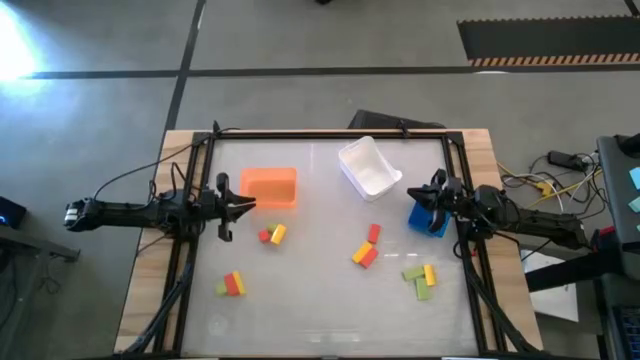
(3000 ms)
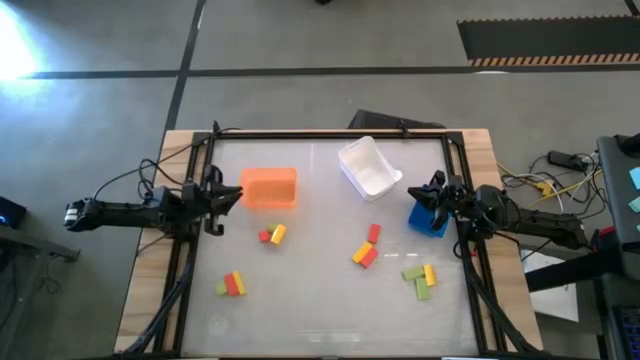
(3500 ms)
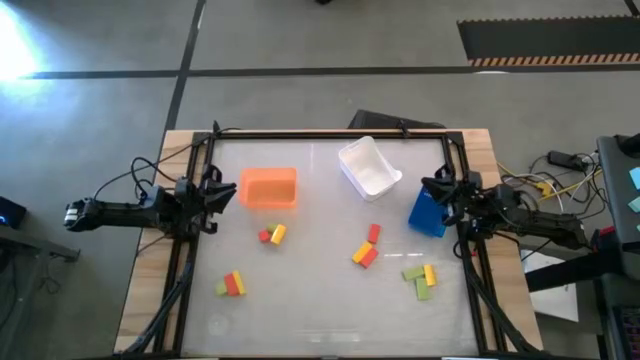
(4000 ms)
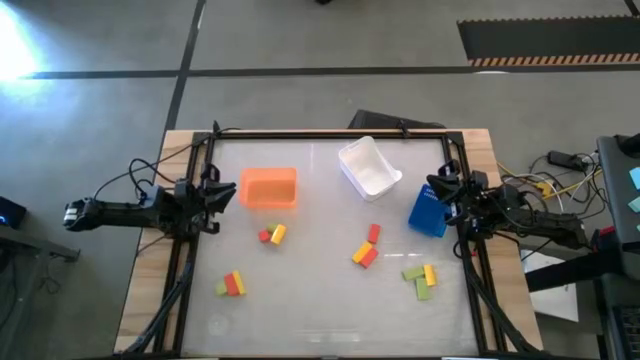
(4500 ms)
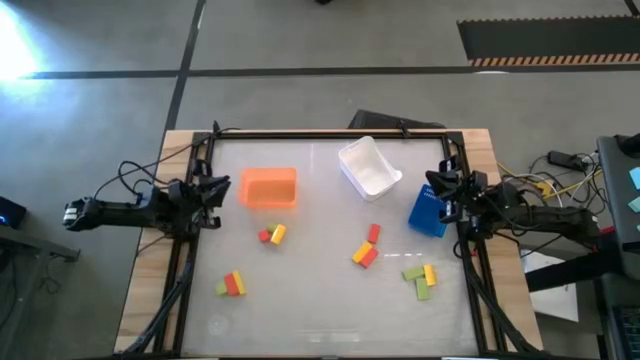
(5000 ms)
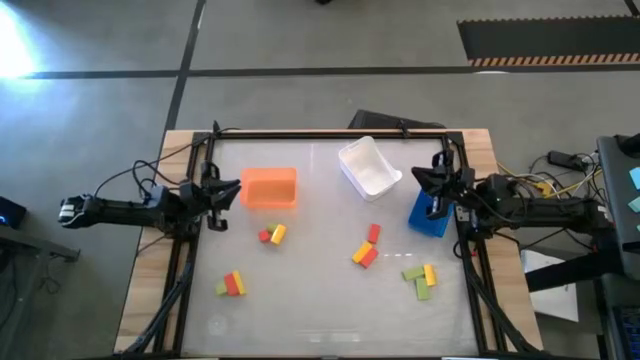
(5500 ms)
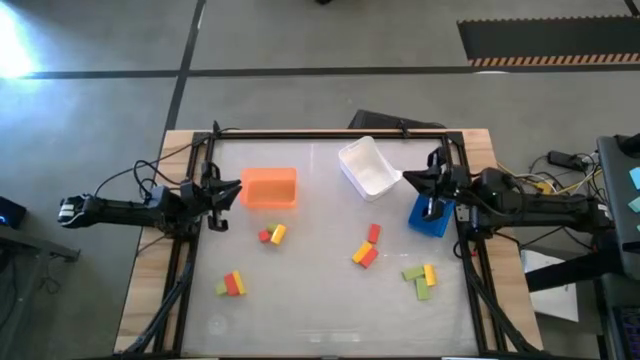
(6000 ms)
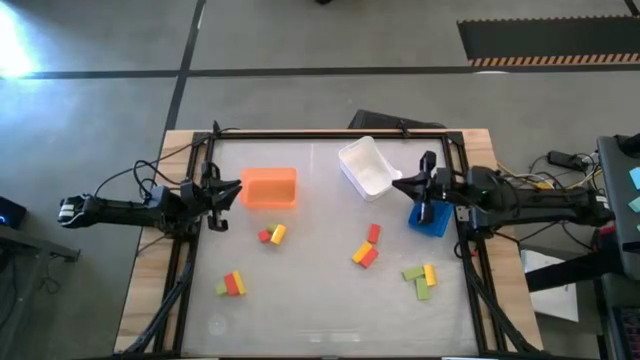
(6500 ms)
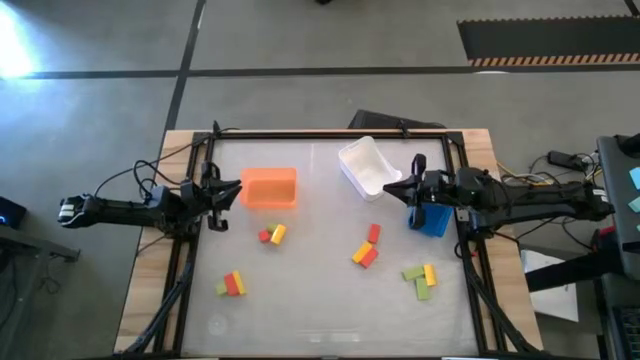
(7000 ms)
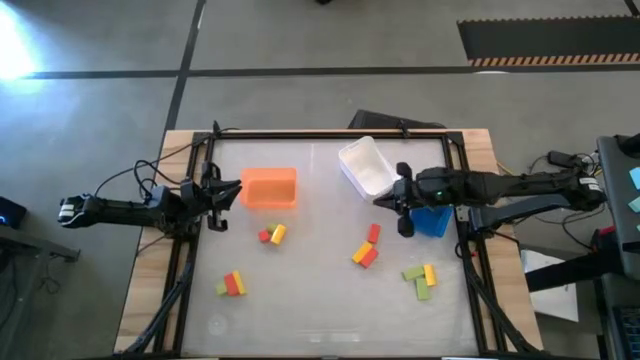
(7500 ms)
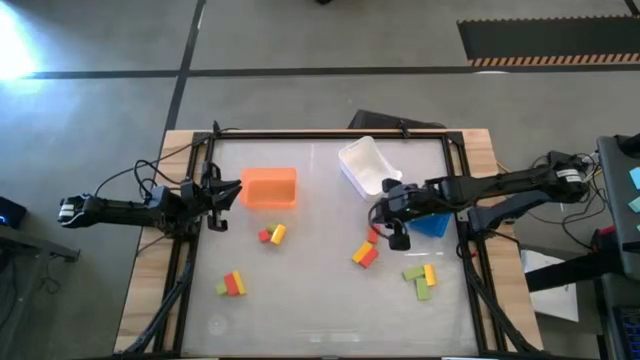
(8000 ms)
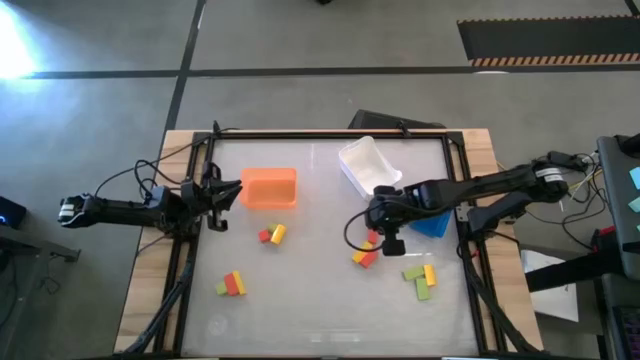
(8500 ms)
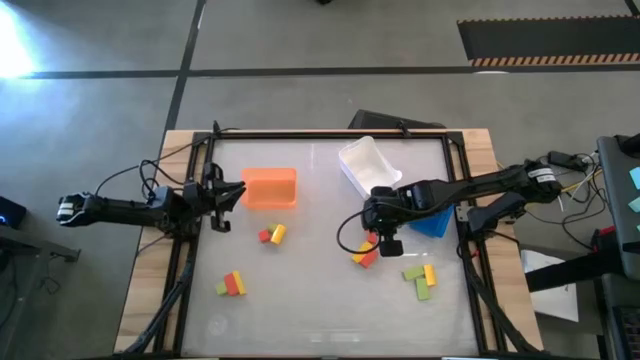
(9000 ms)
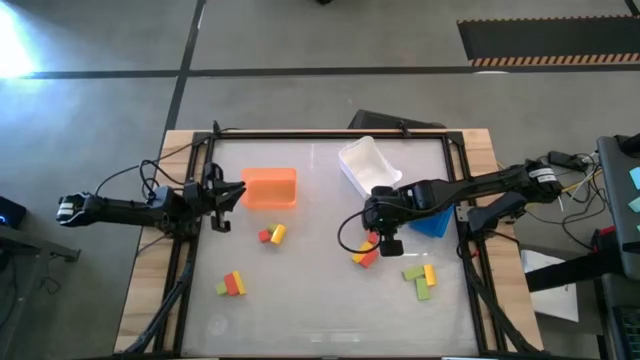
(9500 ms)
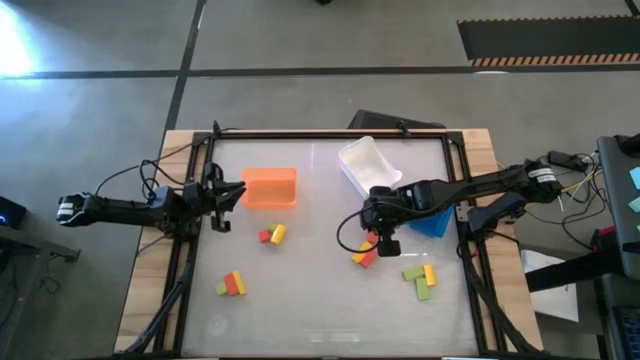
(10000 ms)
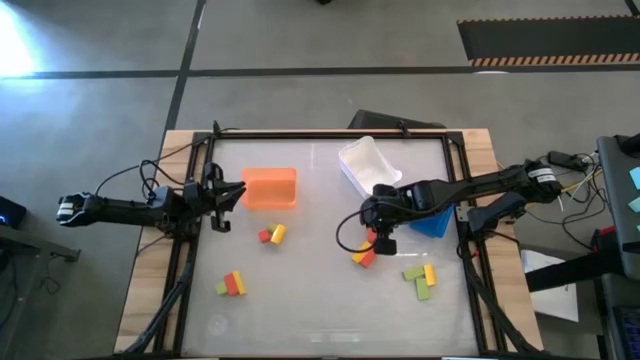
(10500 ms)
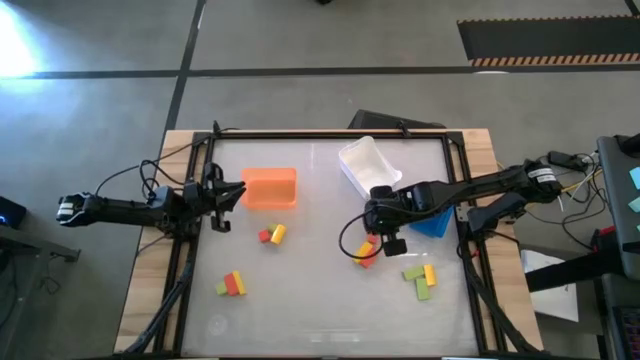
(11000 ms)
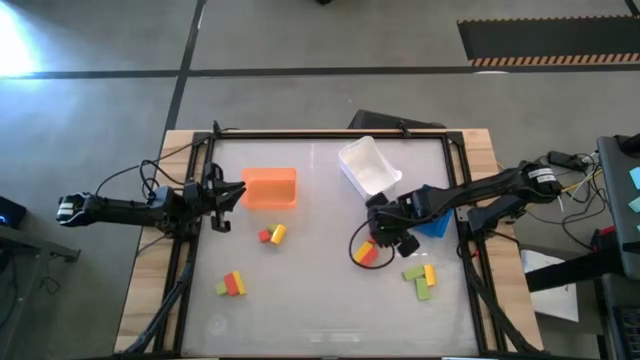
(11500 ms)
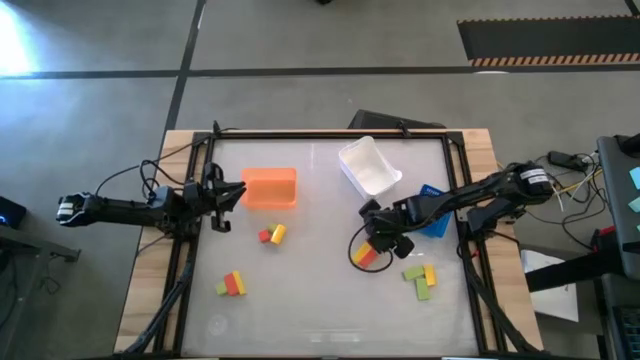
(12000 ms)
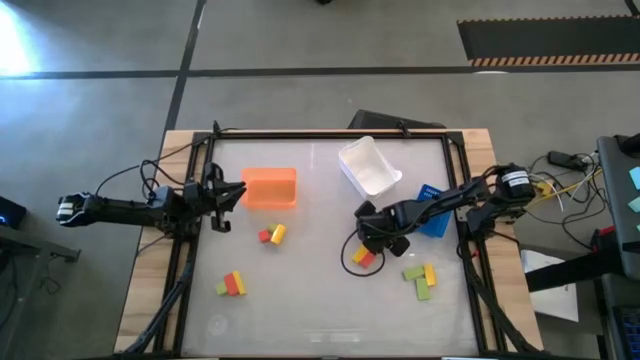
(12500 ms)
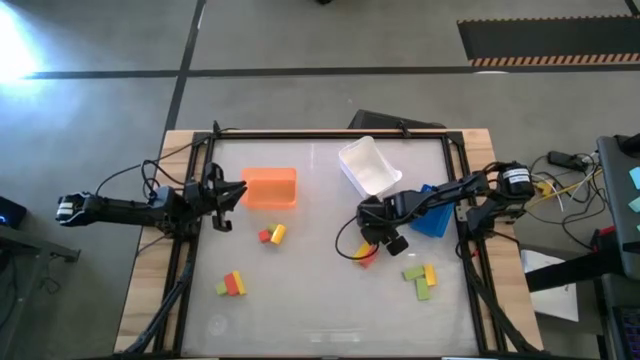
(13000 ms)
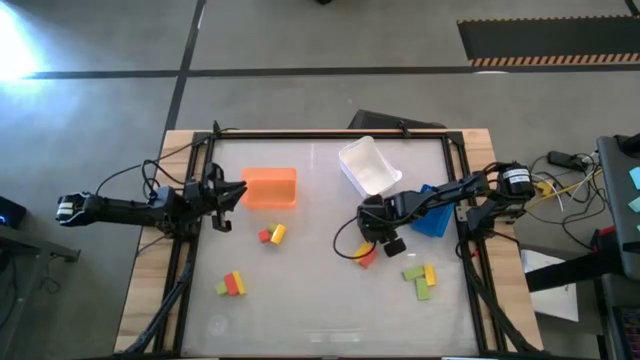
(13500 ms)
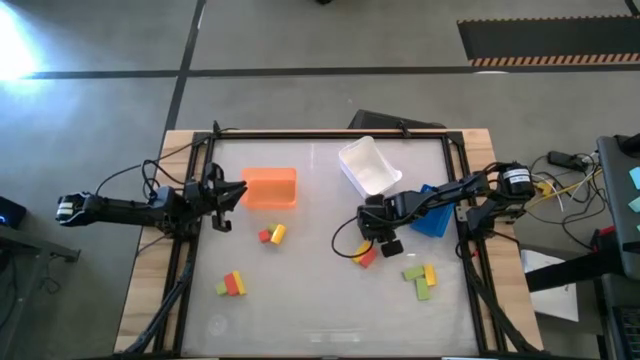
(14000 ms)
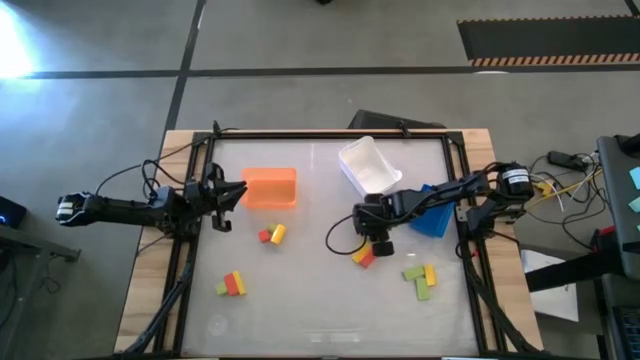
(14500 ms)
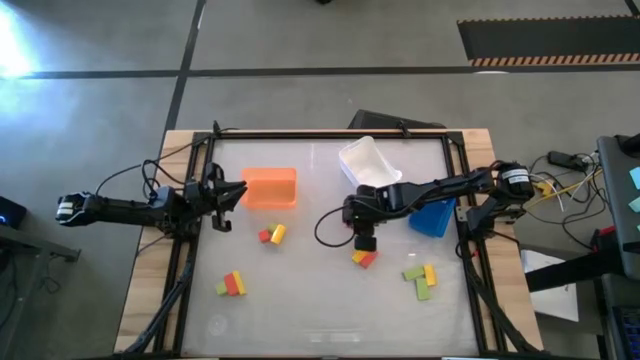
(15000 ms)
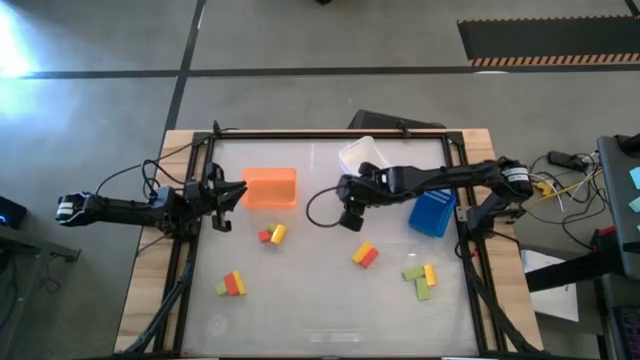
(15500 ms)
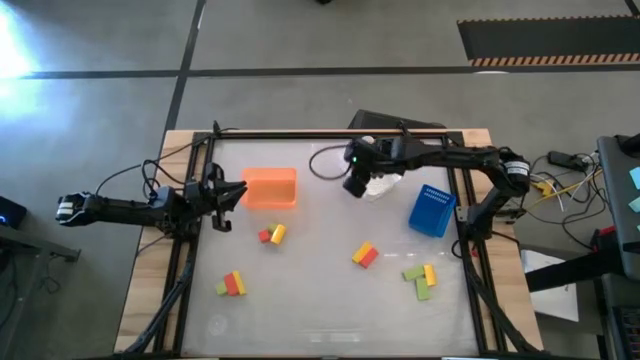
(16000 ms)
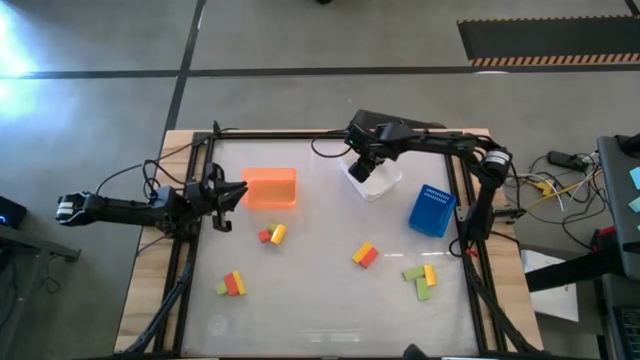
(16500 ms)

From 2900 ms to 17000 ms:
Task: Sort & place blocks by color
Put the orange block into the white bin

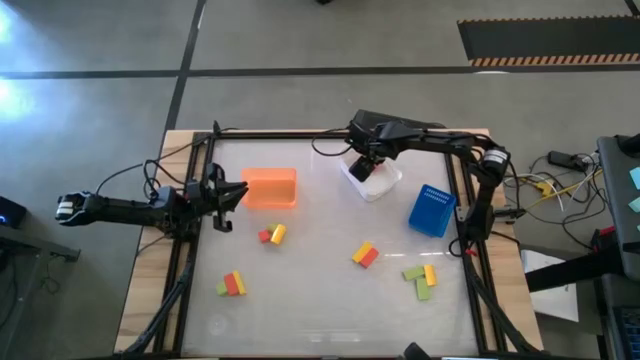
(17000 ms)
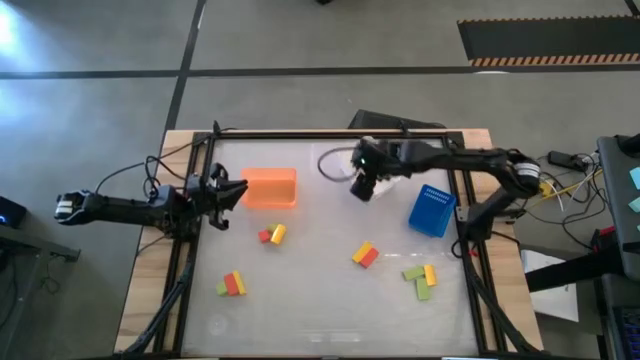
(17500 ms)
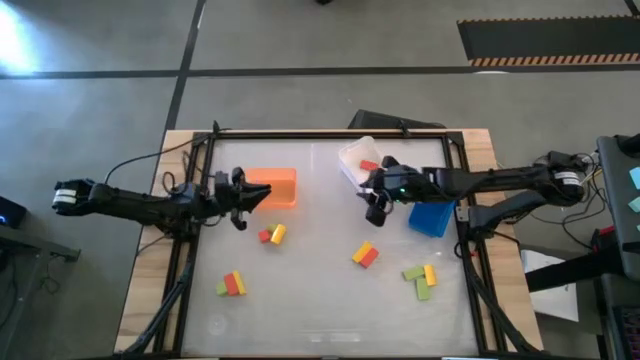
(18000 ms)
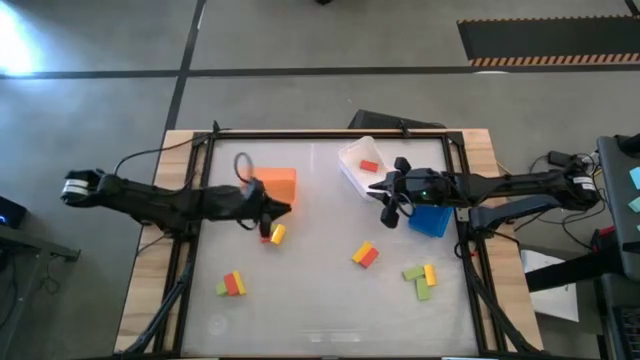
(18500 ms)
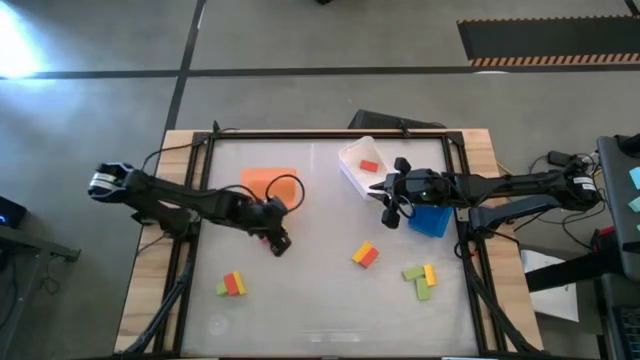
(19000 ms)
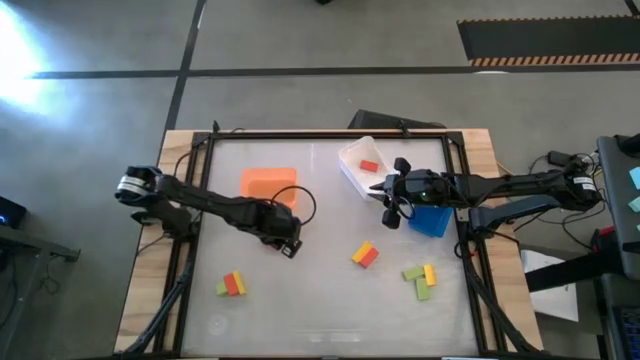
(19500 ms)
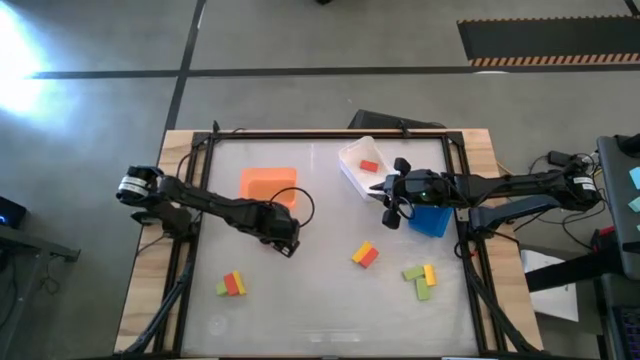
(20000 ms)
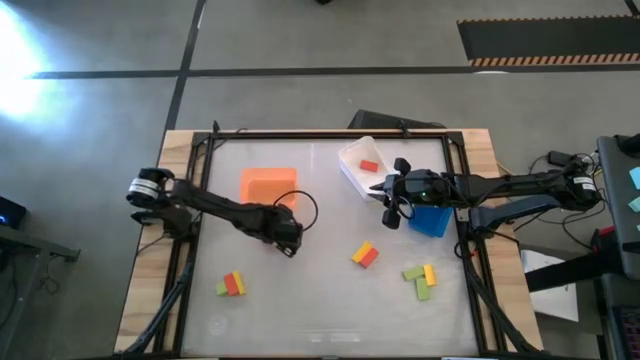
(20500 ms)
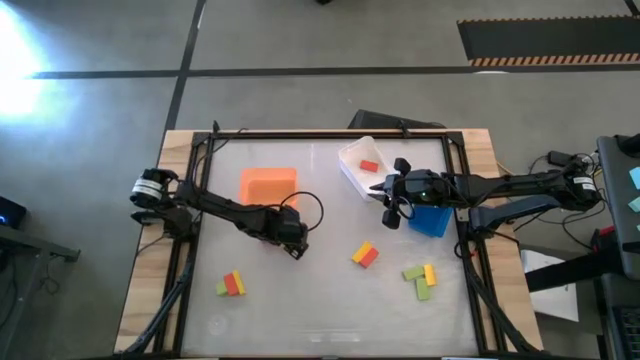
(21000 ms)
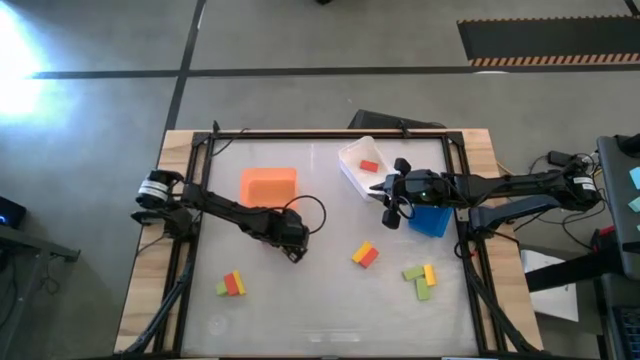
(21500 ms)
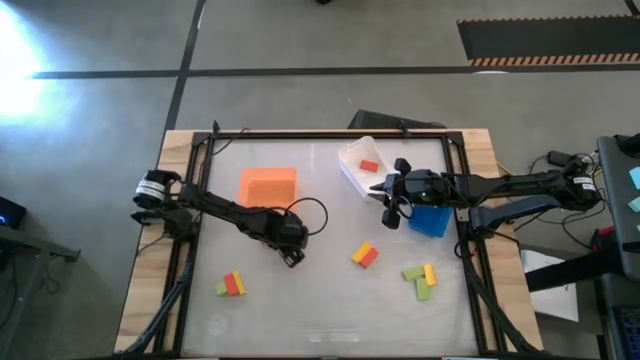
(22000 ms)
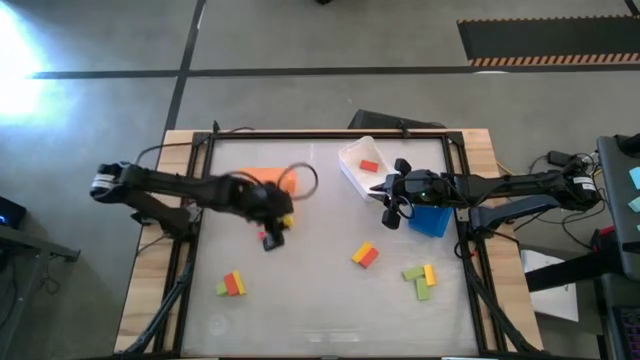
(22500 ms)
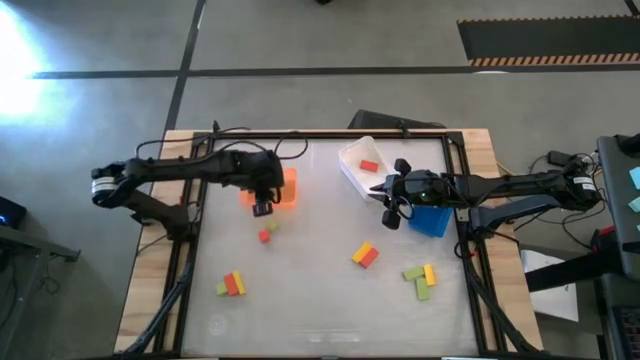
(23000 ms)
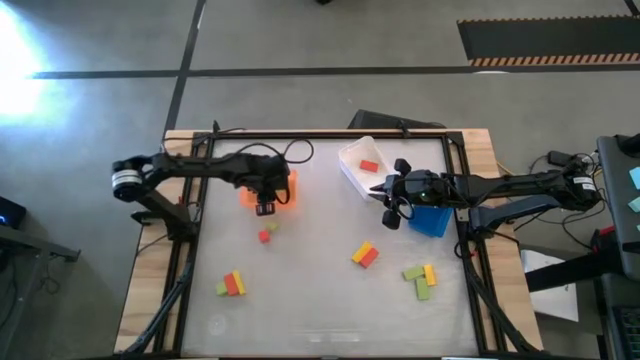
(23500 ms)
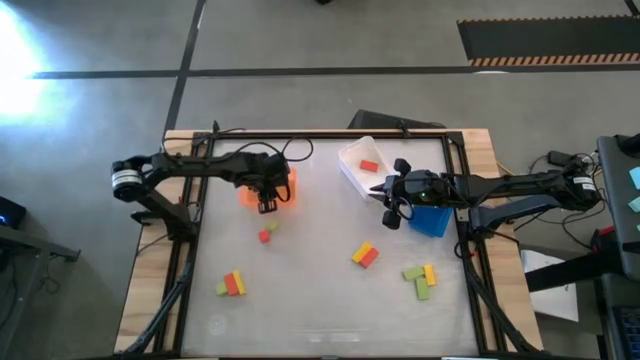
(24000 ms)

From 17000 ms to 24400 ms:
Put the yellow block into the orange bin
